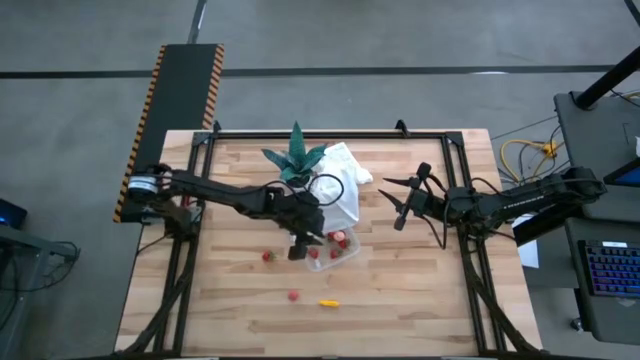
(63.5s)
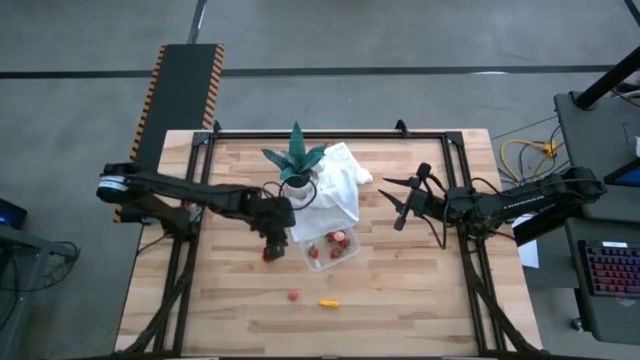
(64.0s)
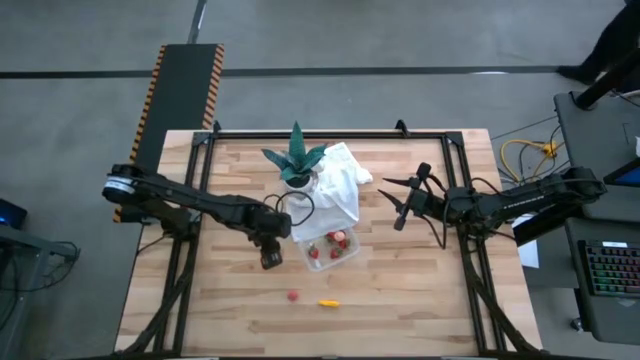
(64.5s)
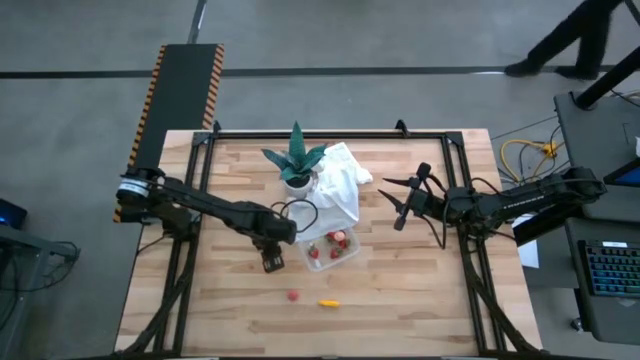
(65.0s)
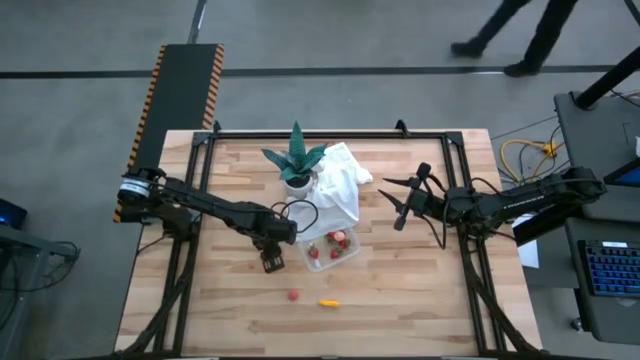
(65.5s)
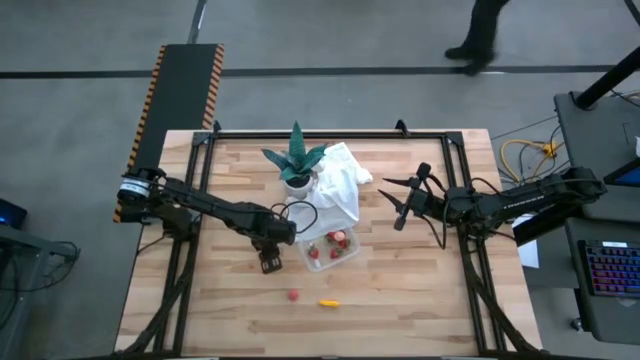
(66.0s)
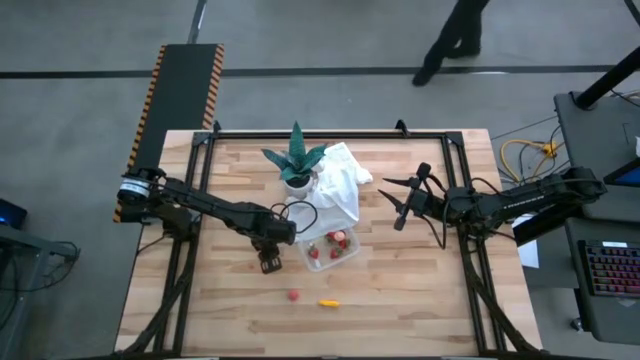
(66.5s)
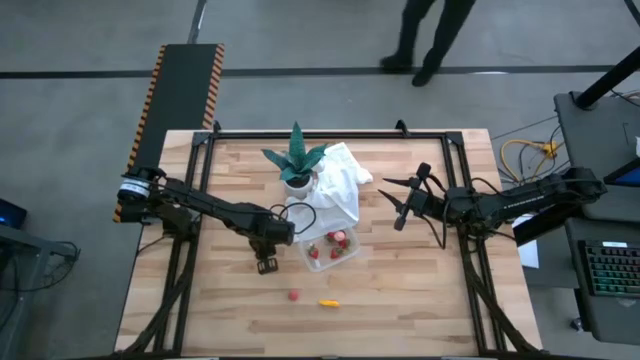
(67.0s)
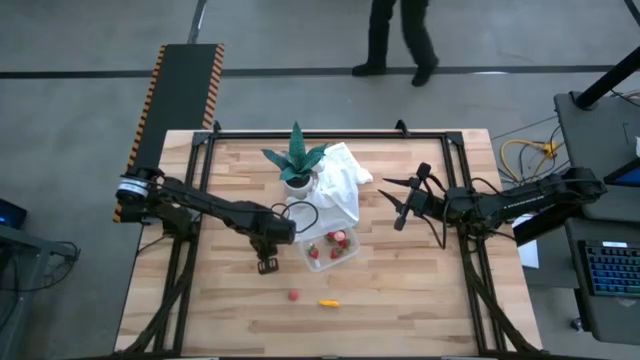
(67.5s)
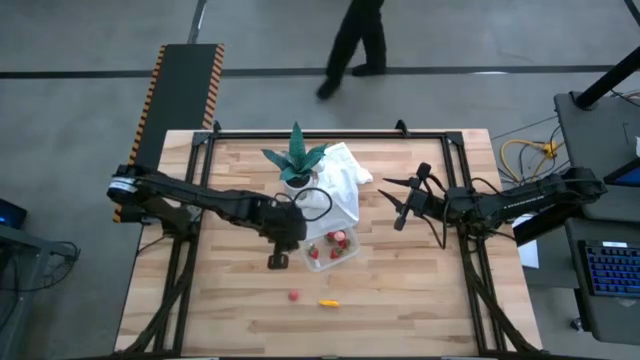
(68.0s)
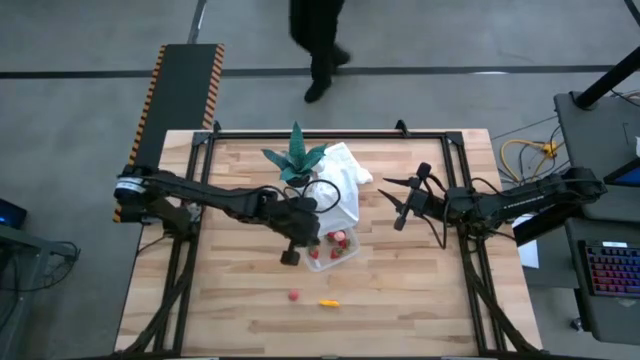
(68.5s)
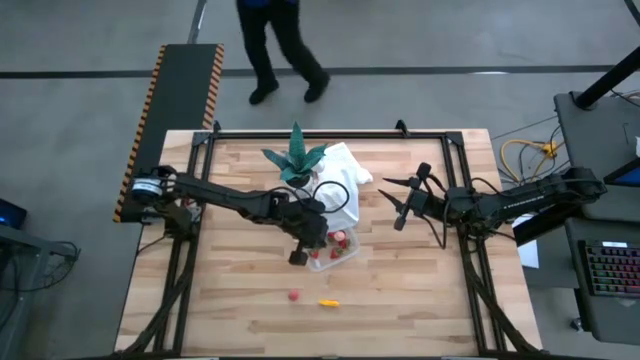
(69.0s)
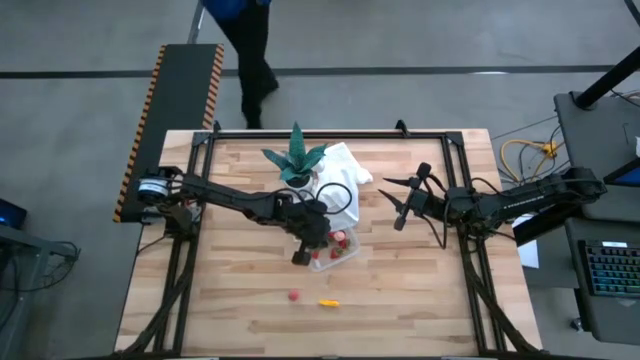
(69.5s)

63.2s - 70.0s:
Task: Pick and placing Produce into tupperware
Put the strawberry into the transparent bin

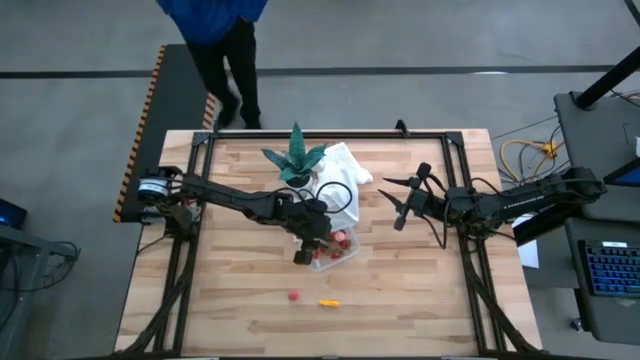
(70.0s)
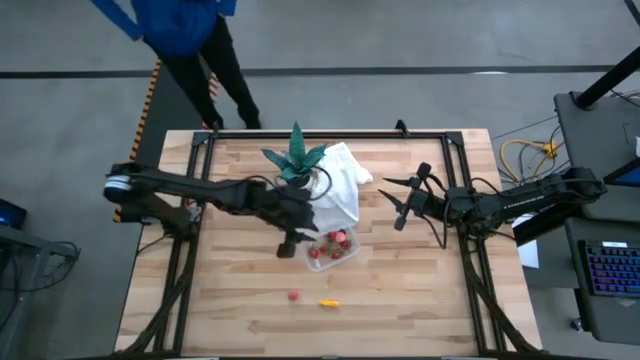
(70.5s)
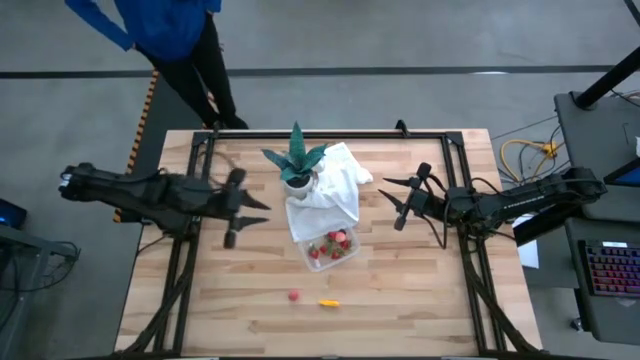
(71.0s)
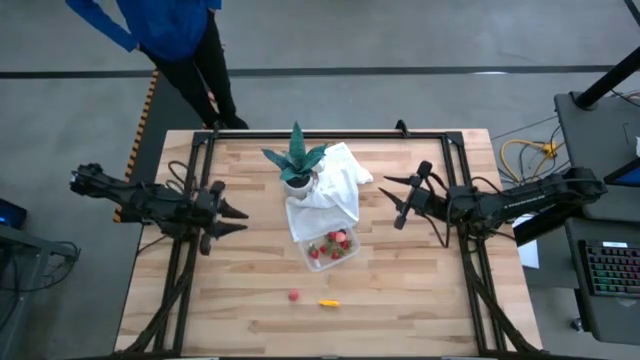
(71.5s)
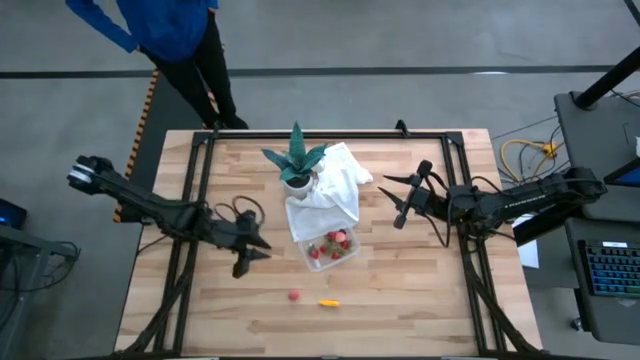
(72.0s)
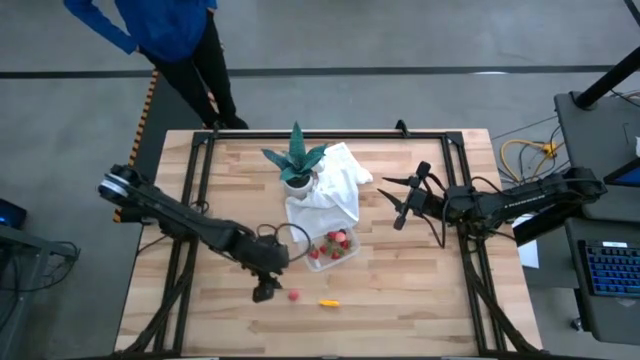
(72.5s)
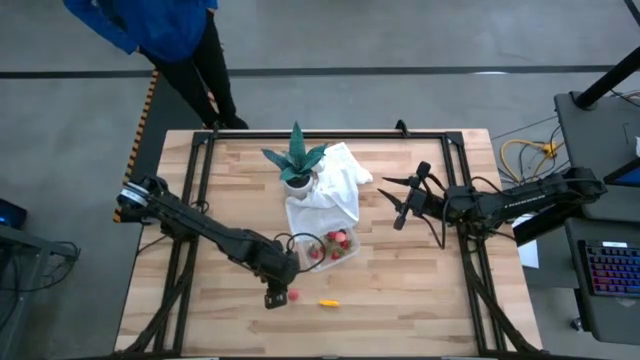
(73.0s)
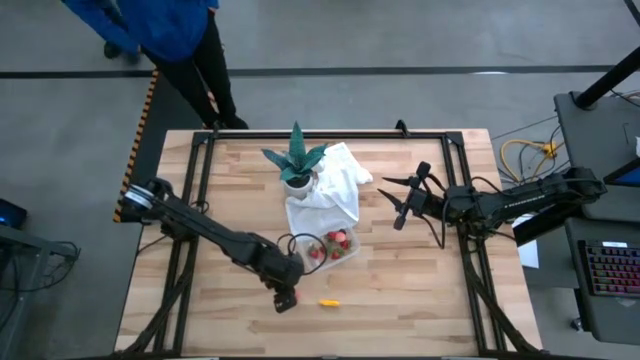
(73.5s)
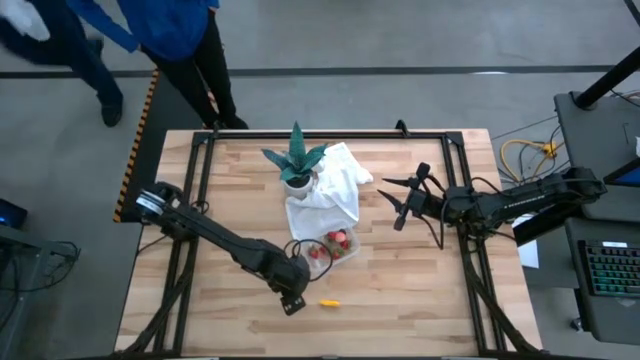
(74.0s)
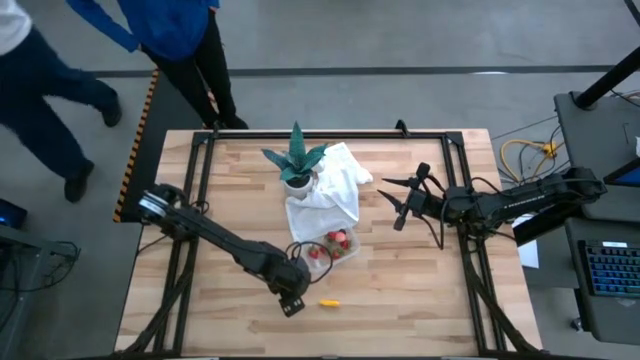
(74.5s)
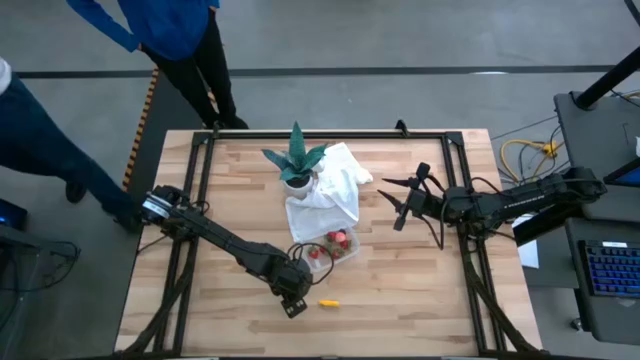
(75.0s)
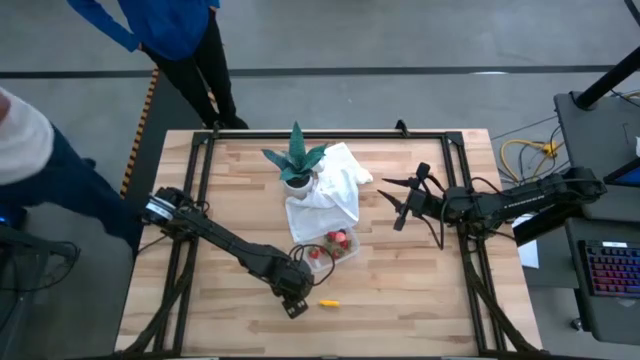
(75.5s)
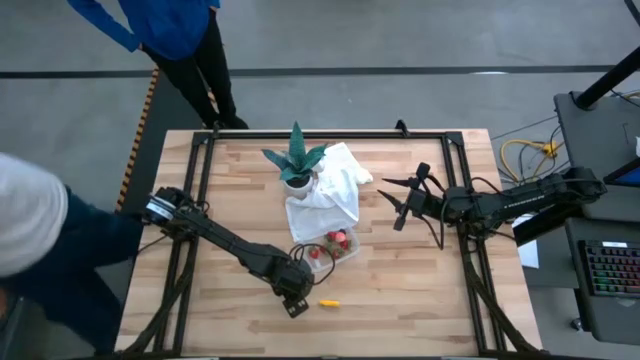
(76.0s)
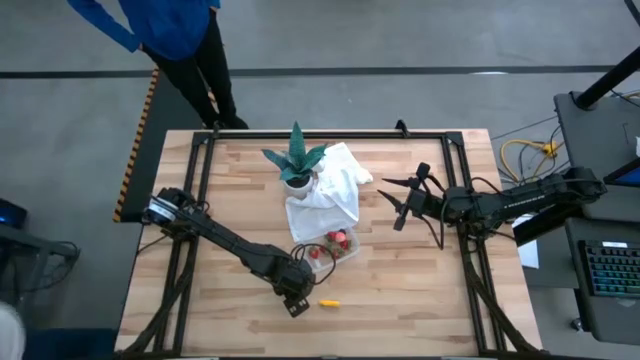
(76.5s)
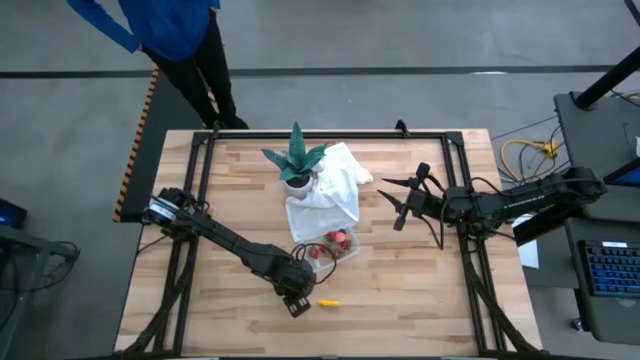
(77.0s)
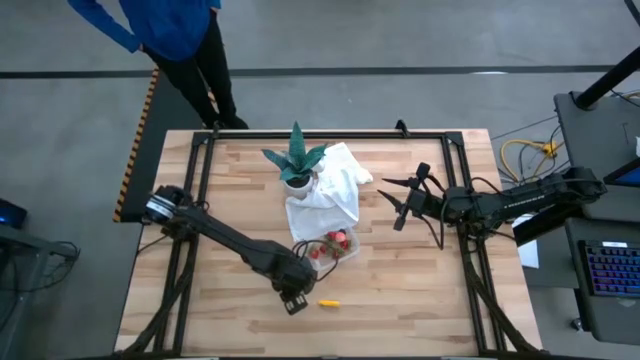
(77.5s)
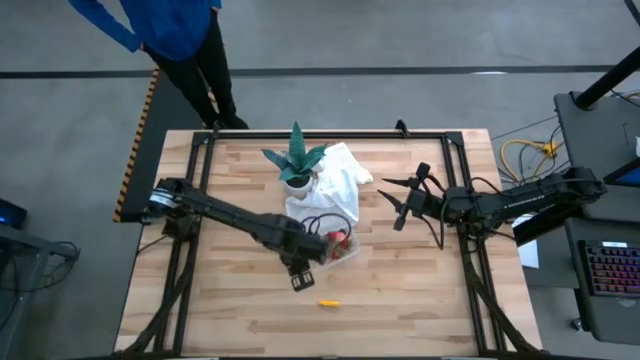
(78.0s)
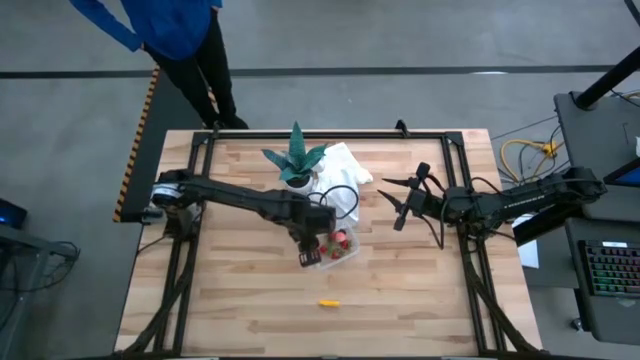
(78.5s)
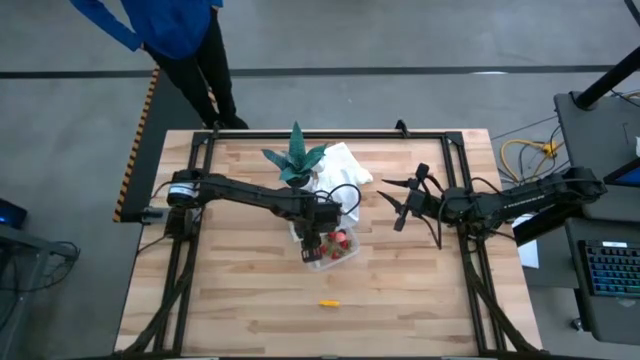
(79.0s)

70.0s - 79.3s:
Put the apricot into the transparent bin

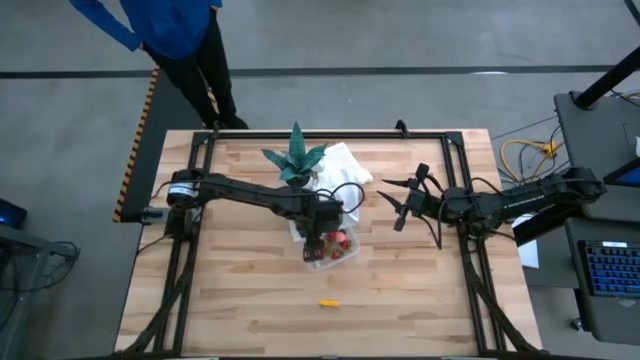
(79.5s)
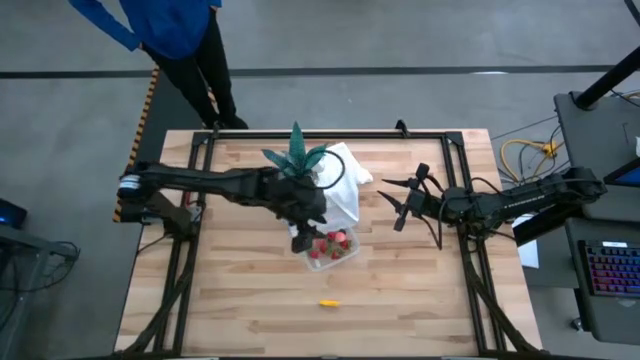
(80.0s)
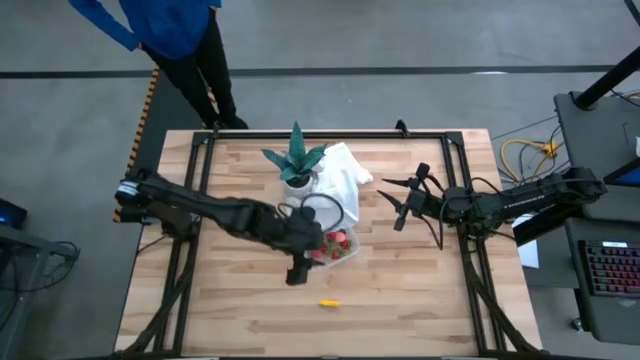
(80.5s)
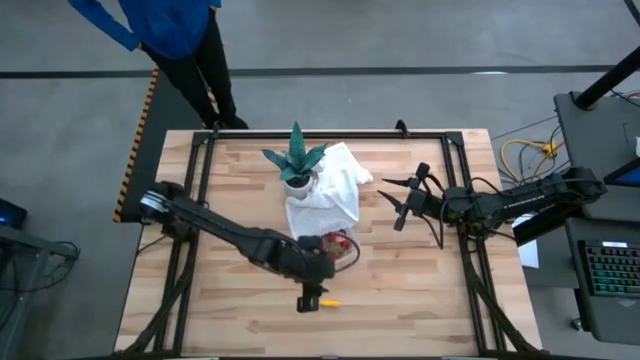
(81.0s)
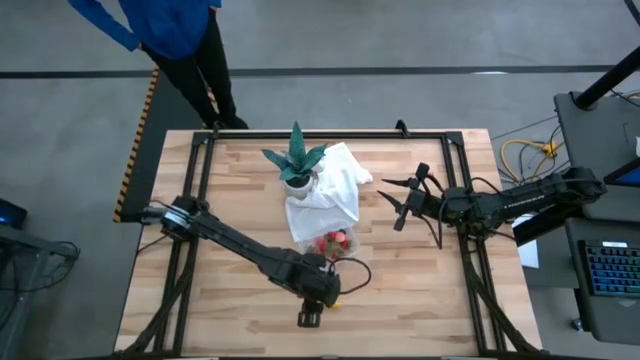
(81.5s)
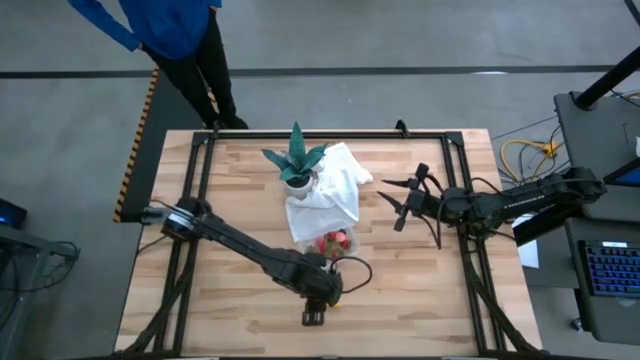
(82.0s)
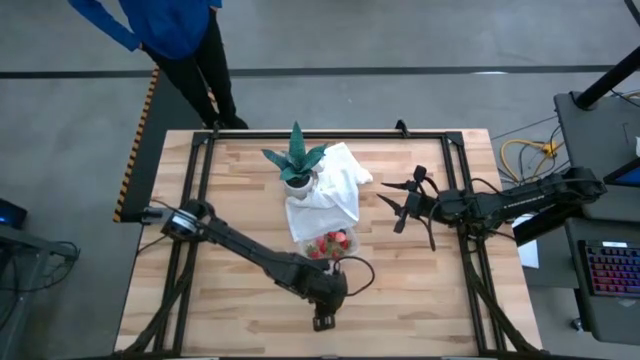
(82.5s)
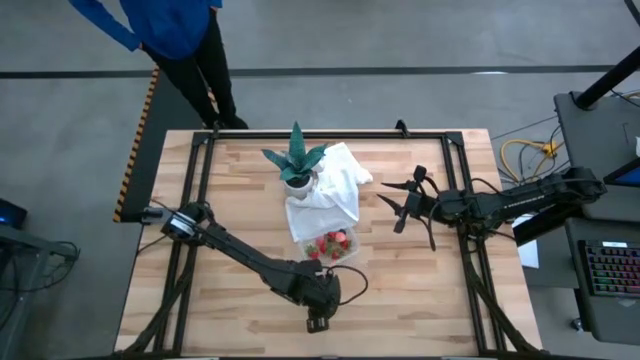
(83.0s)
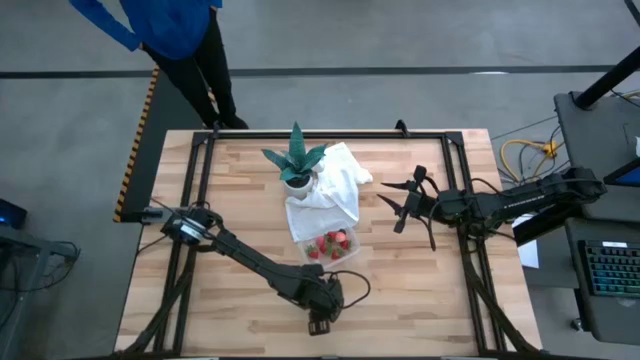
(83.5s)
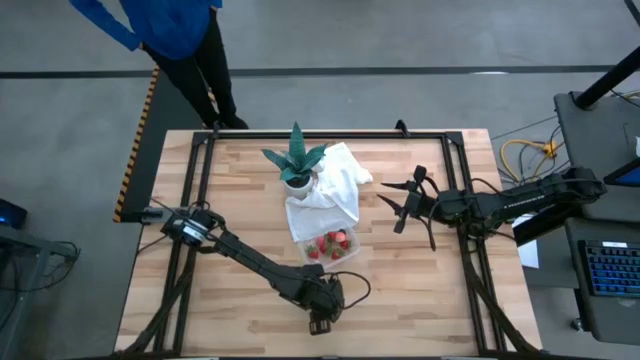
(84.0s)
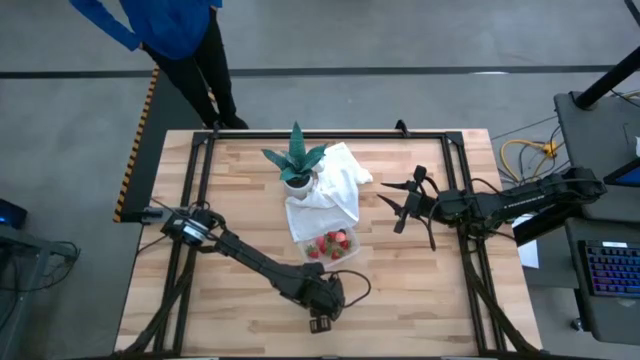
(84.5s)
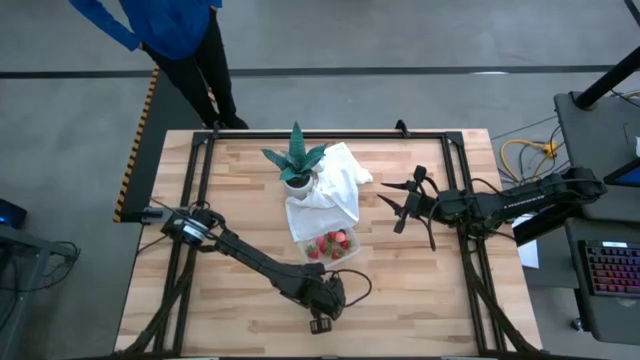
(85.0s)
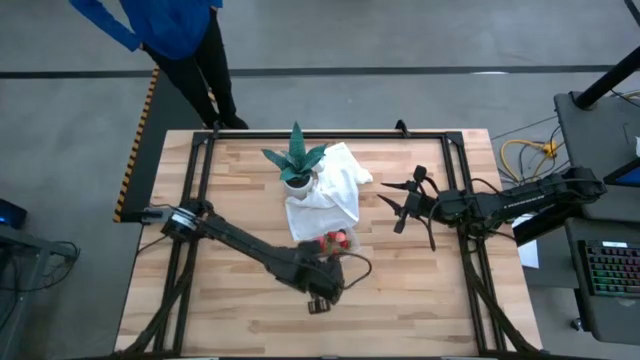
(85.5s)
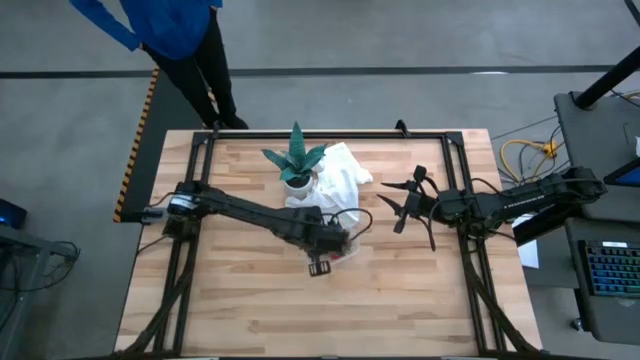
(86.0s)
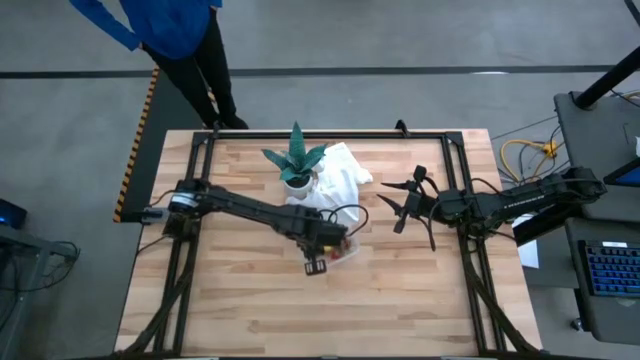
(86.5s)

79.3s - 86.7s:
Put the corn into the transparent bin
